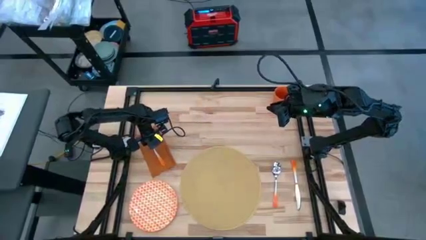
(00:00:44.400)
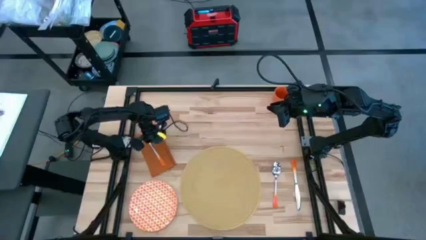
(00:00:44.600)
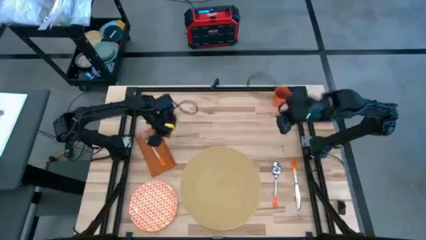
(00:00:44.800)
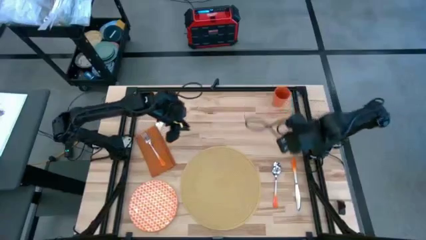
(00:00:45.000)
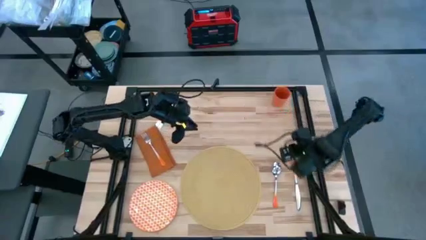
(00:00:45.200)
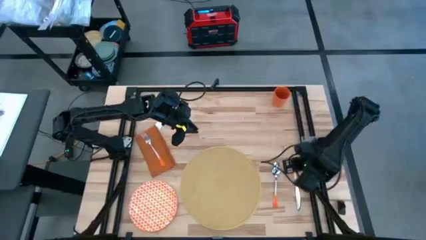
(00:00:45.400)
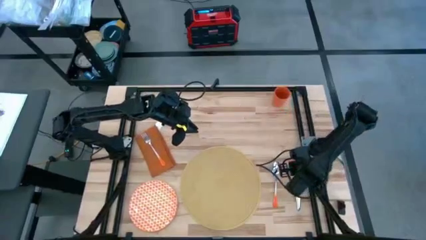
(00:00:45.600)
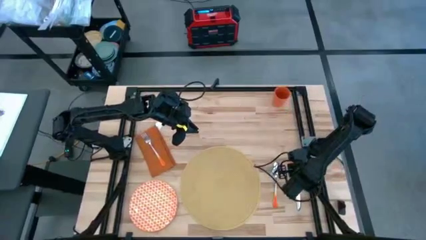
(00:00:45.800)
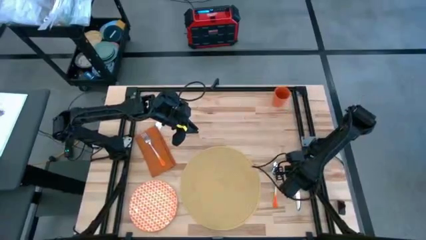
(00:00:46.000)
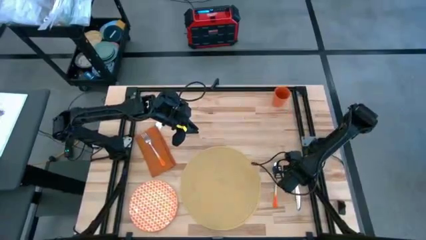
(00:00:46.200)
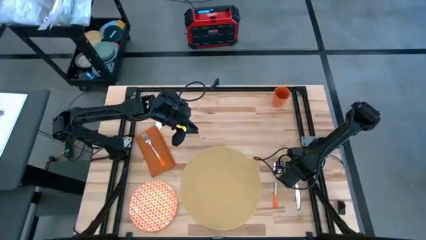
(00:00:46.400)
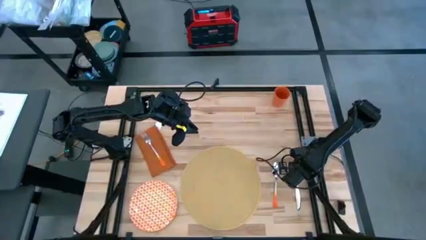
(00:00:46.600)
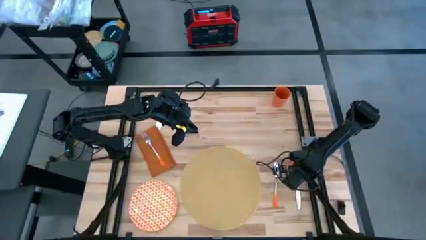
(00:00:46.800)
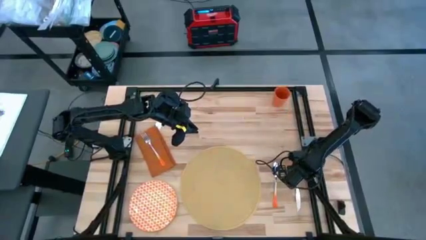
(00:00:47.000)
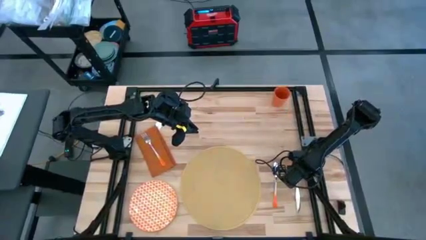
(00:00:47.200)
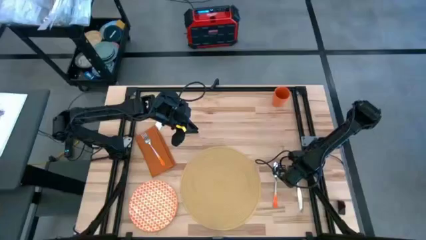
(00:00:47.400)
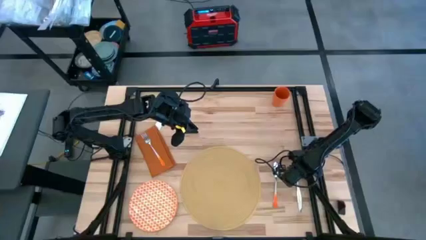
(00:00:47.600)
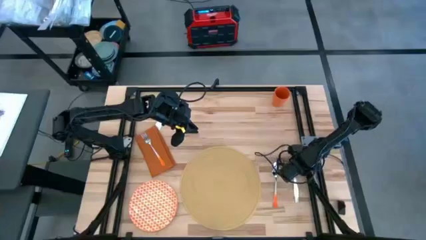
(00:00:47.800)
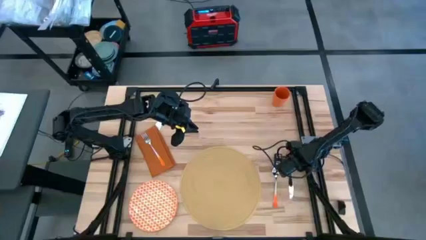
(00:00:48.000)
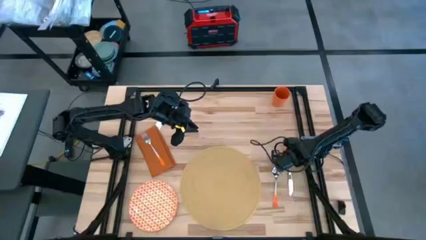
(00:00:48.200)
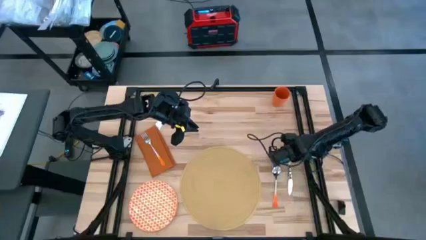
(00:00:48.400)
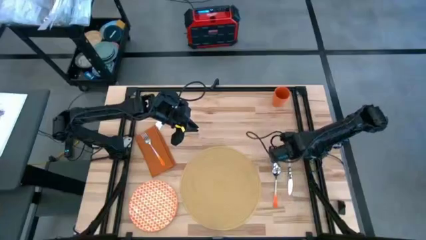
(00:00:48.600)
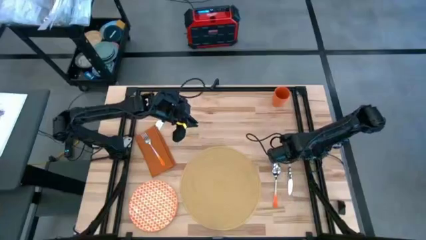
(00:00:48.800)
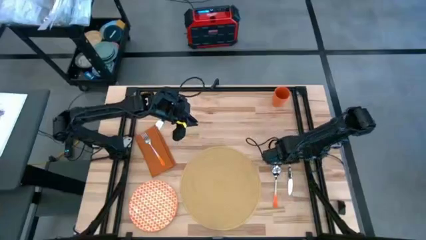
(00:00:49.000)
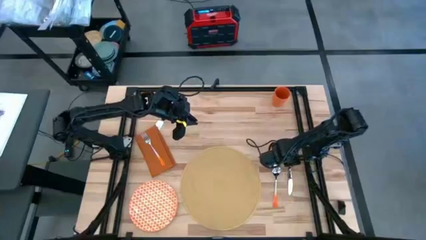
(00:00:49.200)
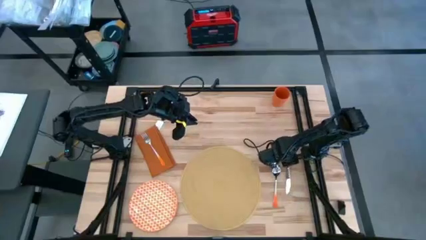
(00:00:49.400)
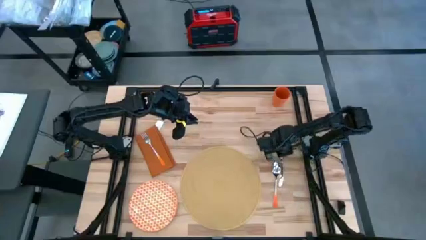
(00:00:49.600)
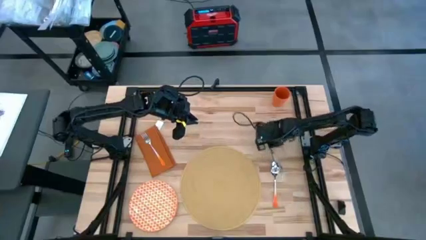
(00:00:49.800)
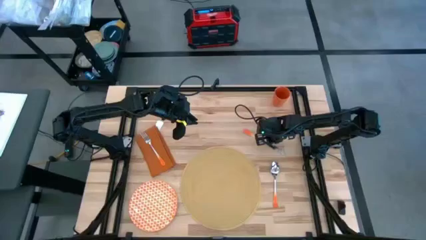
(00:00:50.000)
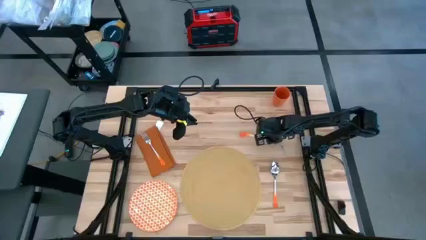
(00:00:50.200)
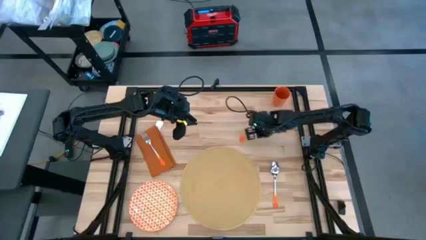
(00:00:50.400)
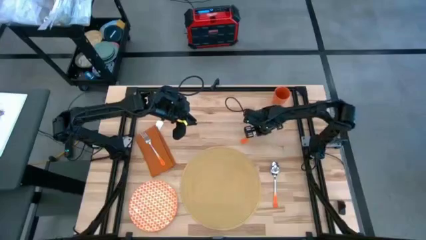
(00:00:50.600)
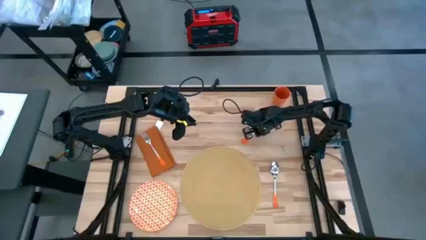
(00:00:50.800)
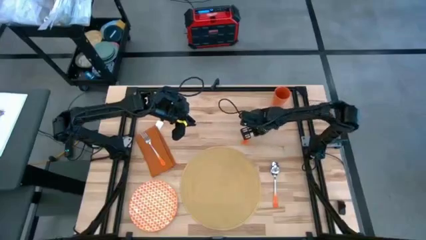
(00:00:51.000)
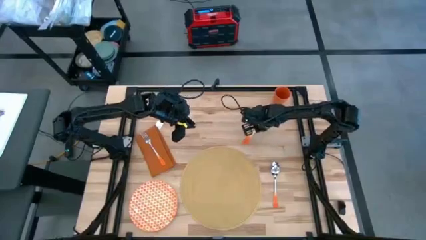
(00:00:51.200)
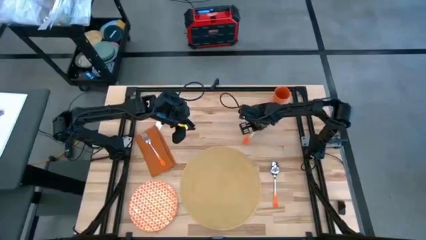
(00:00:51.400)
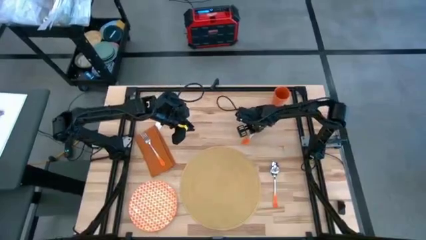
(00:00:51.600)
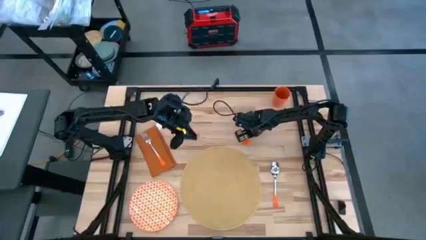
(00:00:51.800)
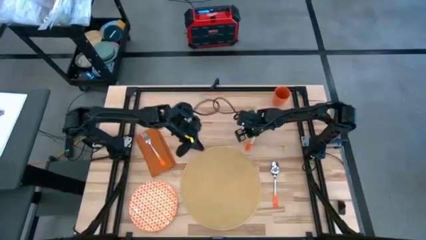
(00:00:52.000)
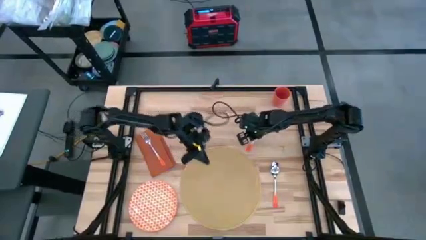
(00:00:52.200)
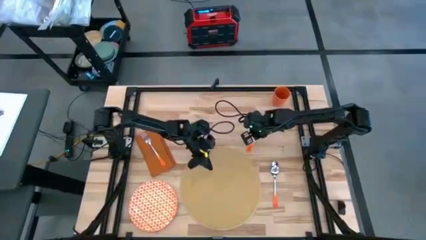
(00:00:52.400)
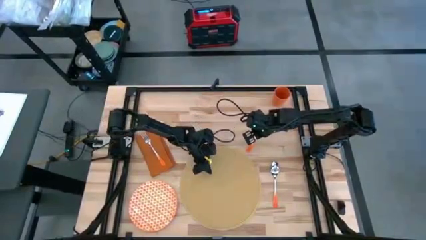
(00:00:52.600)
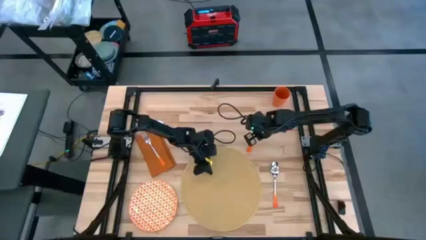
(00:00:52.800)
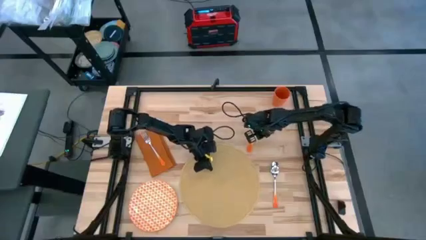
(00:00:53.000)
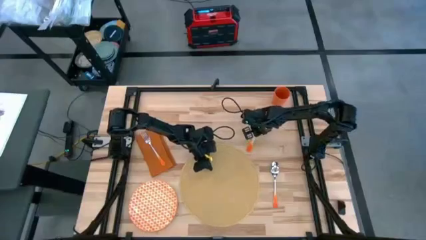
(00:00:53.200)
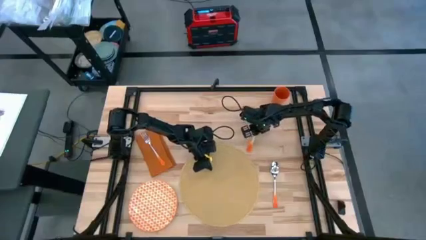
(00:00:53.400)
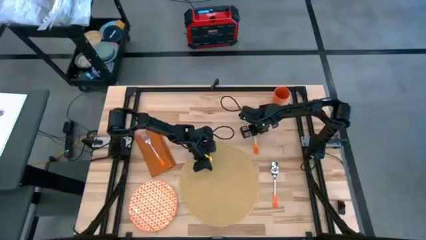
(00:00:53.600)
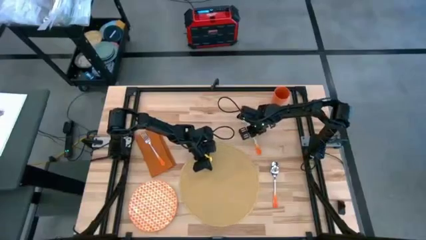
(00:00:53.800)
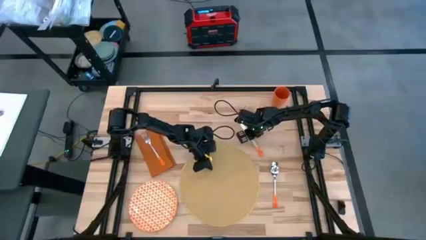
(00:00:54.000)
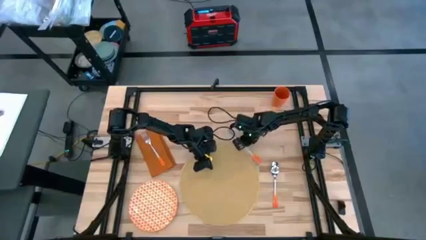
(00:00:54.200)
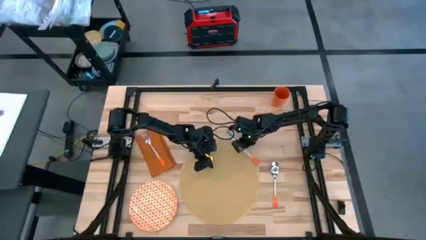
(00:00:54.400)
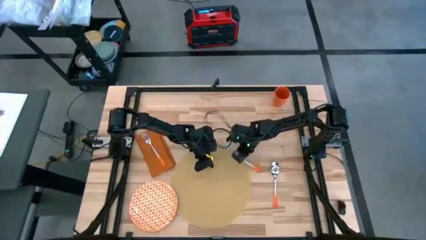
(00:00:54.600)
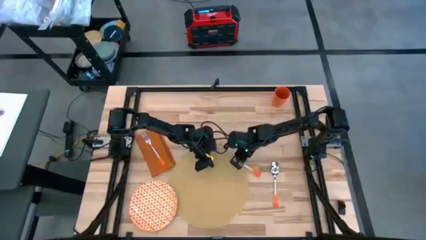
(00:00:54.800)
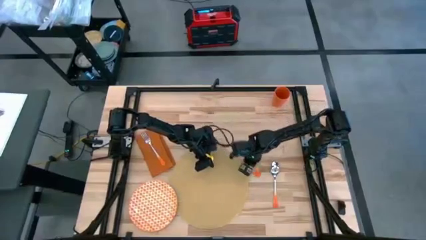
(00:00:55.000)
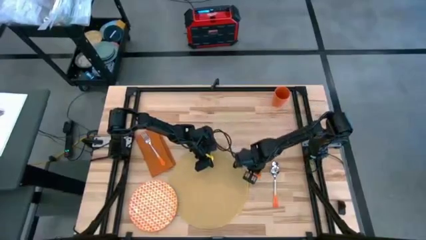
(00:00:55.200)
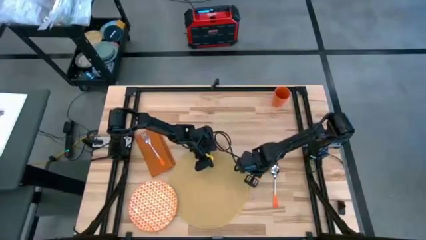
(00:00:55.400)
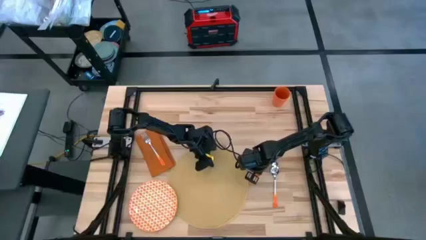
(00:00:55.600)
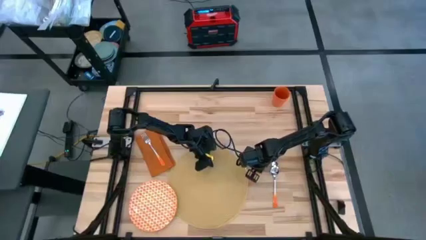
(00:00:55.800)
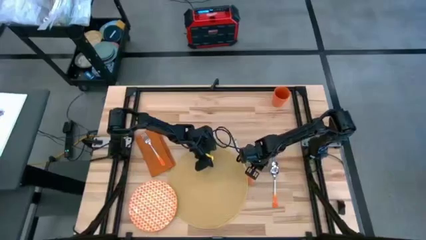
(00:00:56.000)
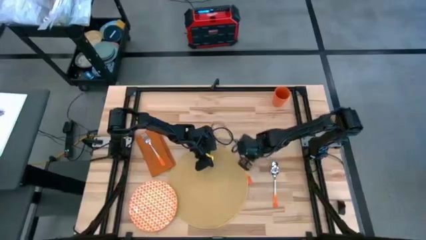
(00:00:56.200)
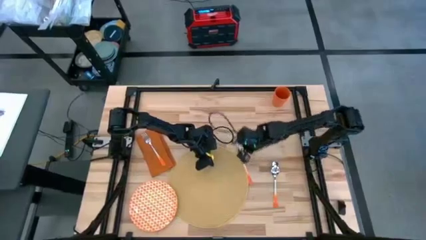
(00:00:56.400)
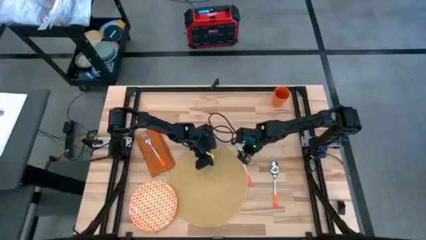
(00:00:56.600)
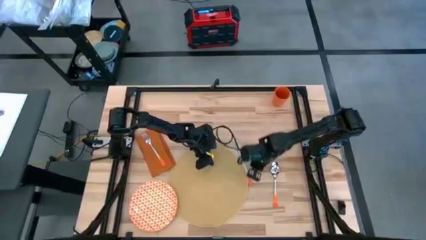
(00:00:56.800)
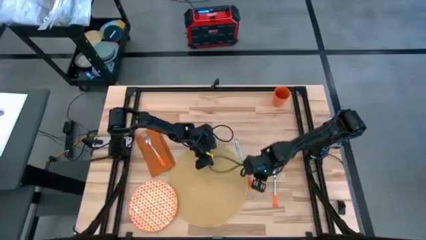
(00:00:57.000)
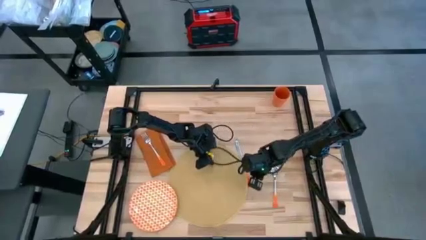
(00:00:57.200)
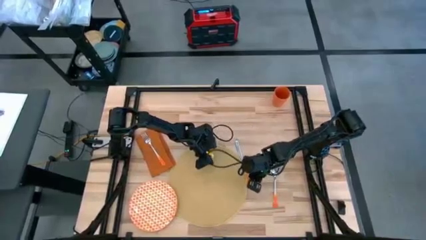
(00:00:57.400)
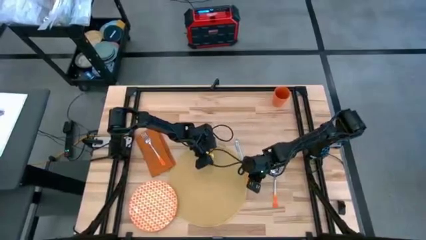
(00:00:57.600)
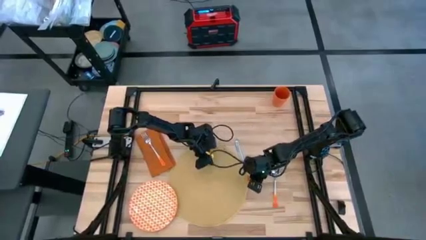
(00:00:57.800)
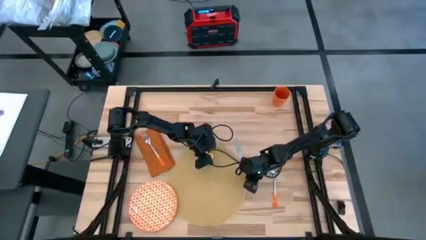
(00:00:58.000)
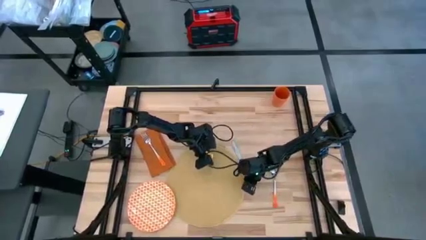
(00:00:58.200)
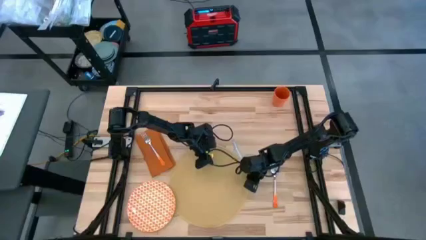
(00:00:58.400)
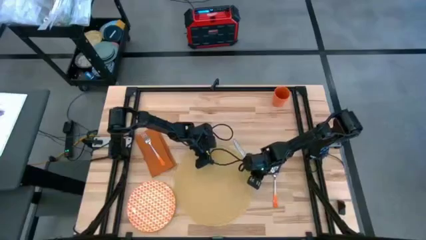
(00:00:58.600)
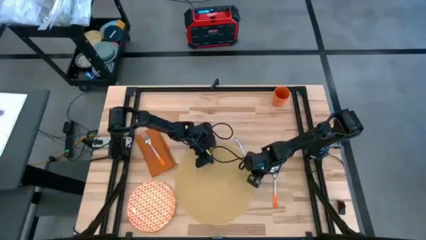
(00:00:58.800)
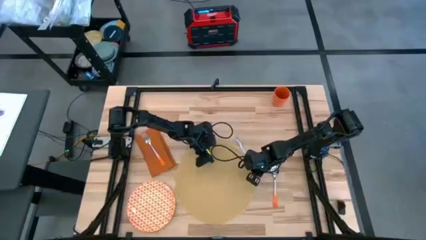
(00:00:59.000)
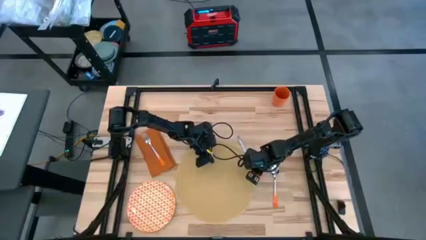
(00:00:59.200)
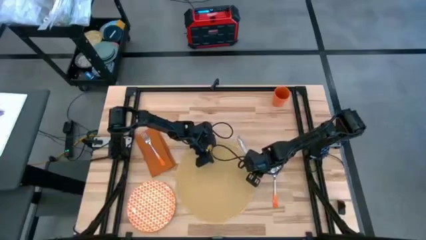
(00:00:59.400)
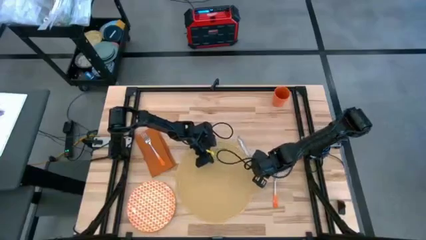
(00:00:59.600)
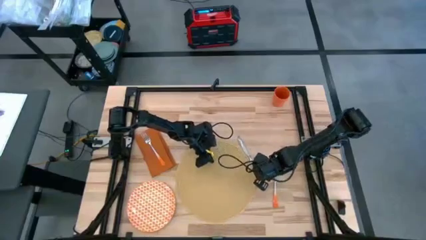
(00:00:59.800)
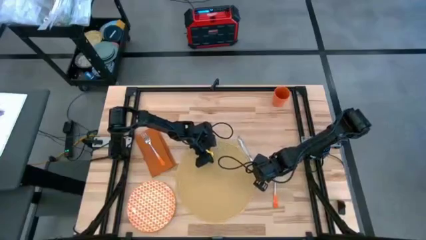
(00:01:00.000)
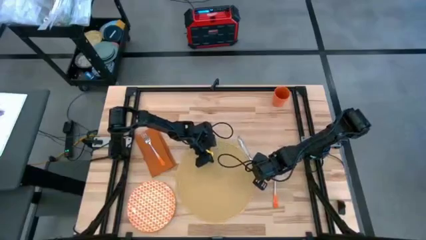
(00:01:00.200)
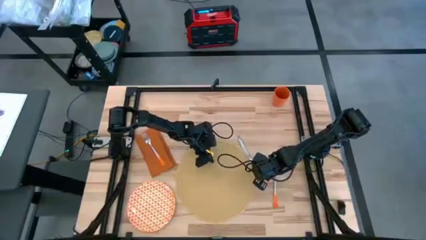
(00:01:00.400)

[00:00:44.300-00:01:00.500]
Task: Set table place
Put the table knife on the placemat
